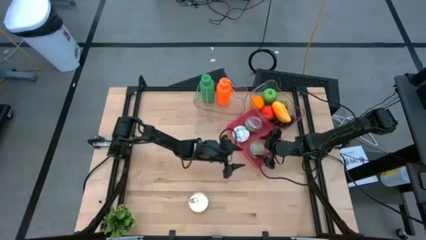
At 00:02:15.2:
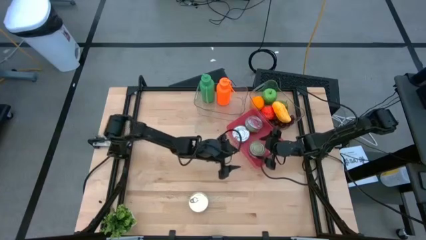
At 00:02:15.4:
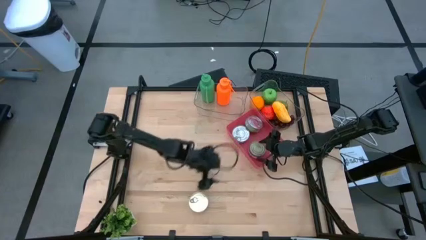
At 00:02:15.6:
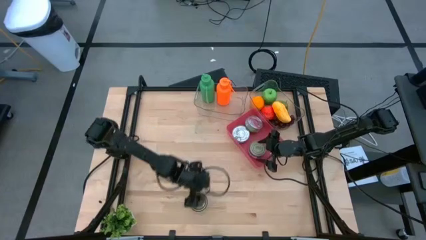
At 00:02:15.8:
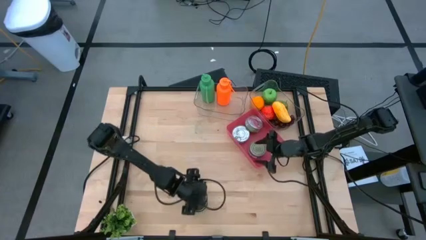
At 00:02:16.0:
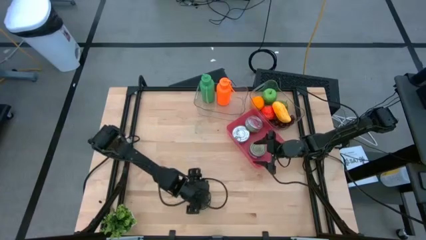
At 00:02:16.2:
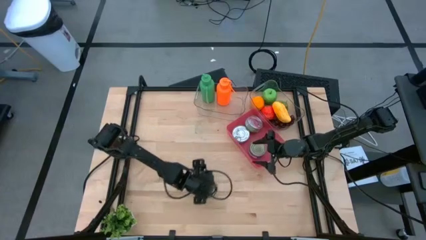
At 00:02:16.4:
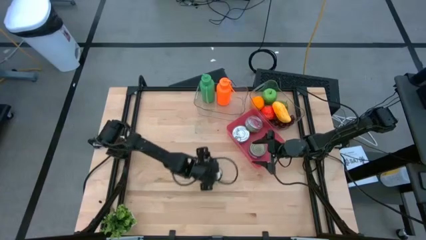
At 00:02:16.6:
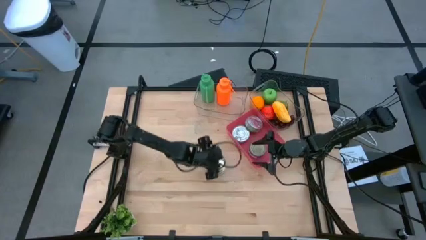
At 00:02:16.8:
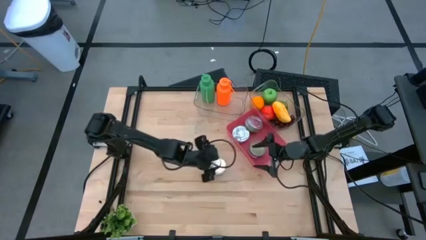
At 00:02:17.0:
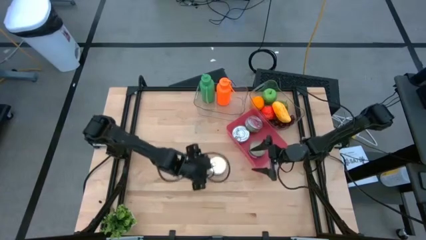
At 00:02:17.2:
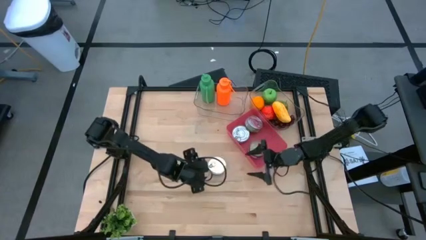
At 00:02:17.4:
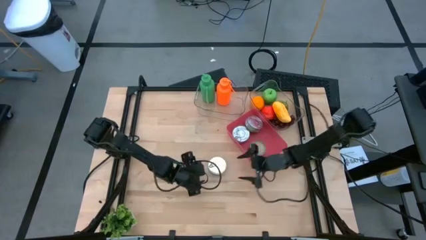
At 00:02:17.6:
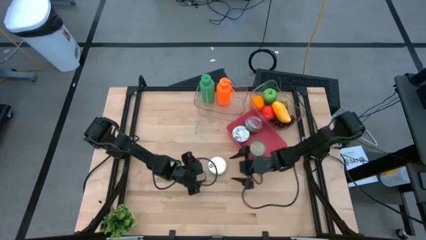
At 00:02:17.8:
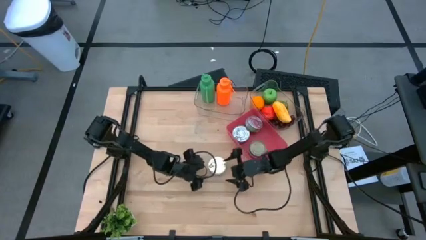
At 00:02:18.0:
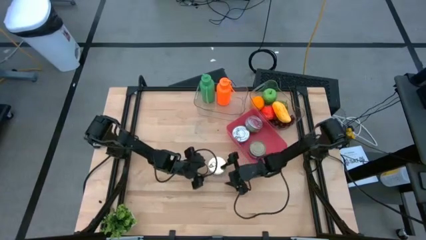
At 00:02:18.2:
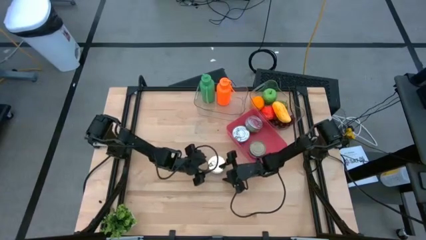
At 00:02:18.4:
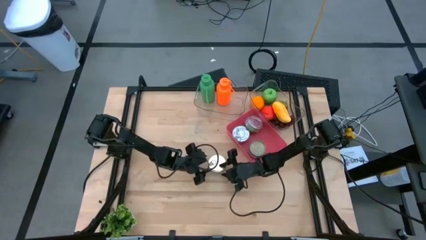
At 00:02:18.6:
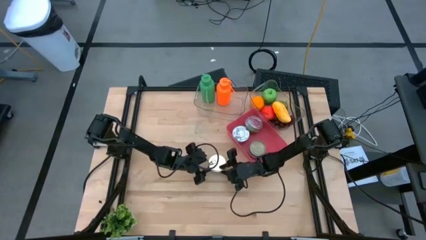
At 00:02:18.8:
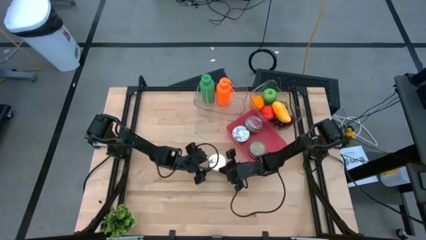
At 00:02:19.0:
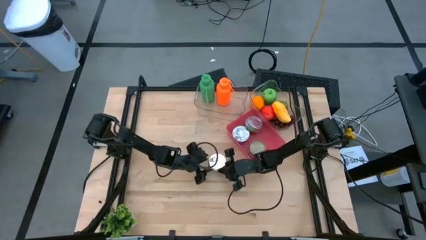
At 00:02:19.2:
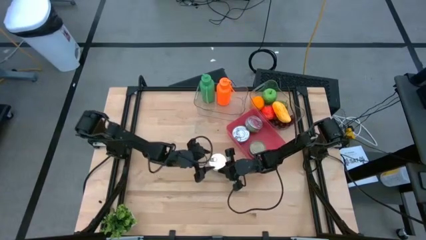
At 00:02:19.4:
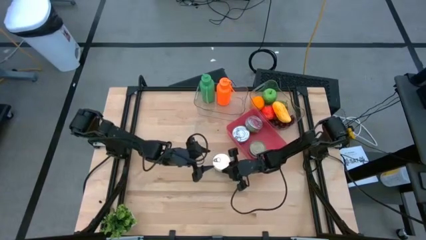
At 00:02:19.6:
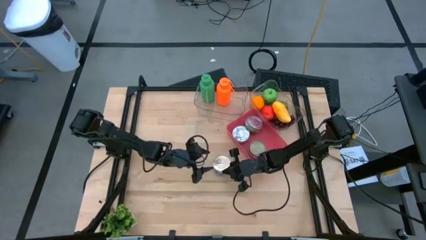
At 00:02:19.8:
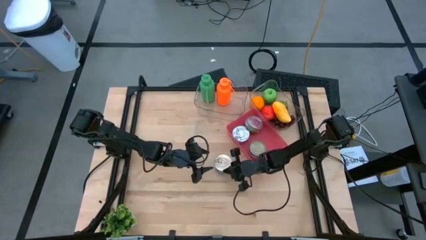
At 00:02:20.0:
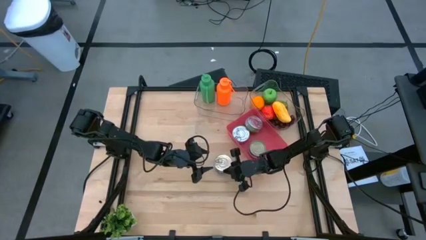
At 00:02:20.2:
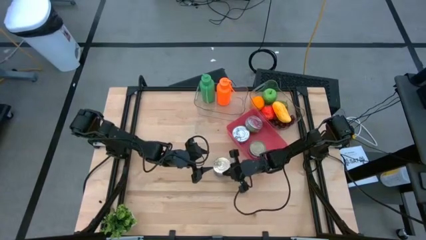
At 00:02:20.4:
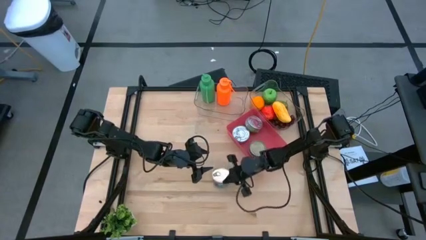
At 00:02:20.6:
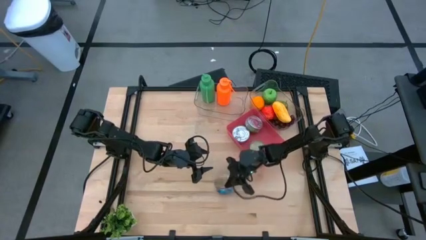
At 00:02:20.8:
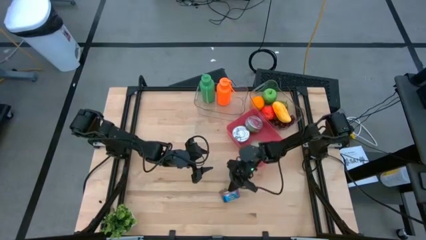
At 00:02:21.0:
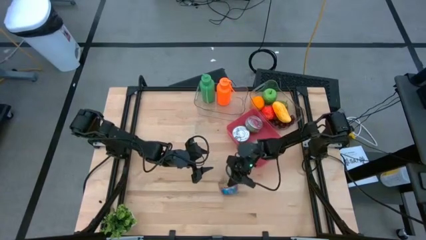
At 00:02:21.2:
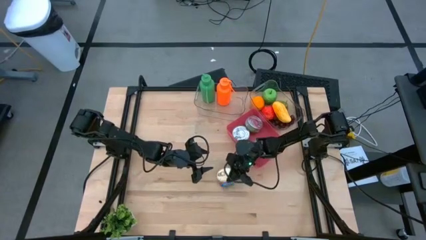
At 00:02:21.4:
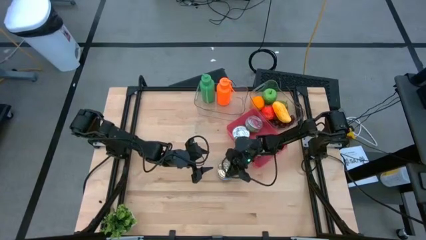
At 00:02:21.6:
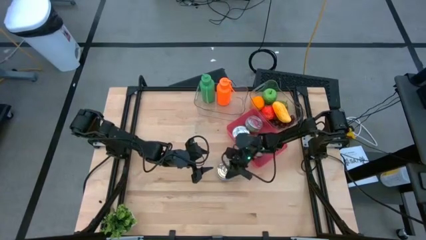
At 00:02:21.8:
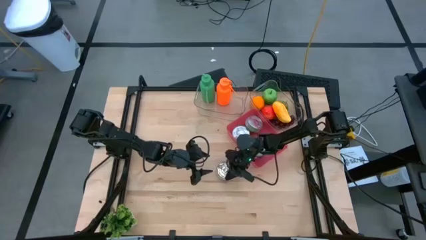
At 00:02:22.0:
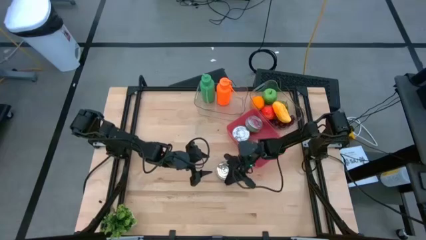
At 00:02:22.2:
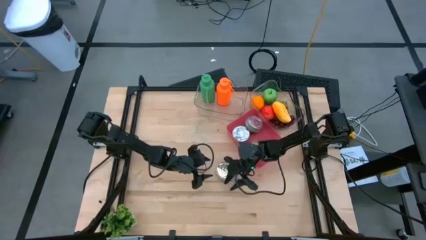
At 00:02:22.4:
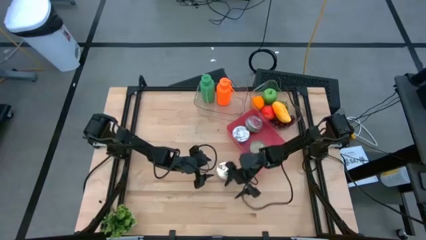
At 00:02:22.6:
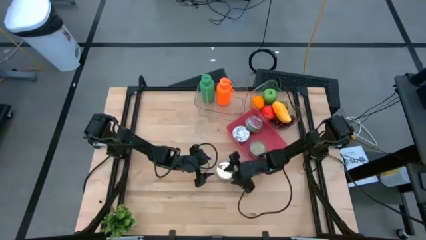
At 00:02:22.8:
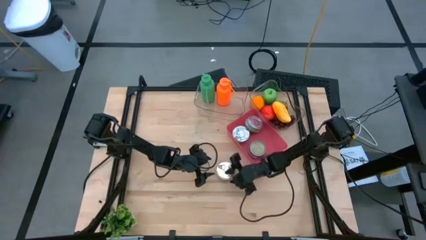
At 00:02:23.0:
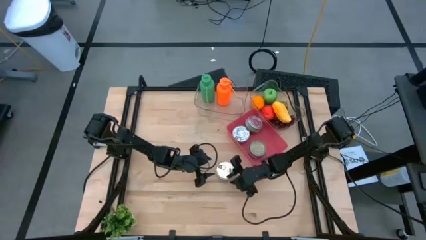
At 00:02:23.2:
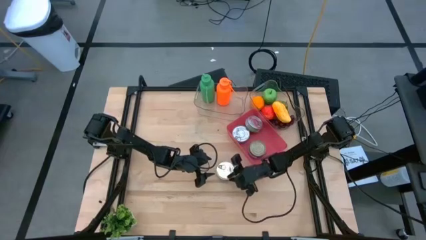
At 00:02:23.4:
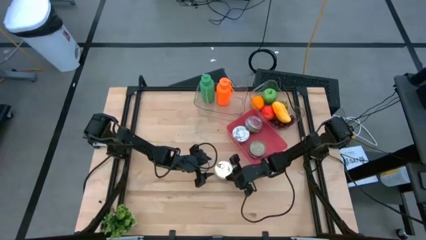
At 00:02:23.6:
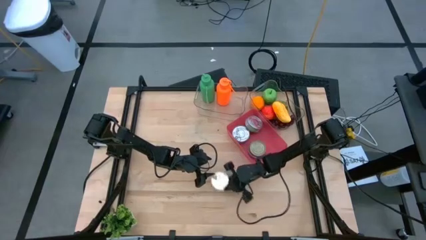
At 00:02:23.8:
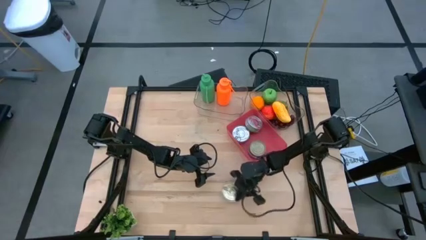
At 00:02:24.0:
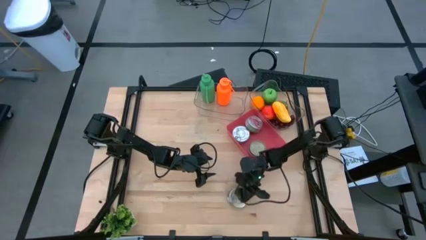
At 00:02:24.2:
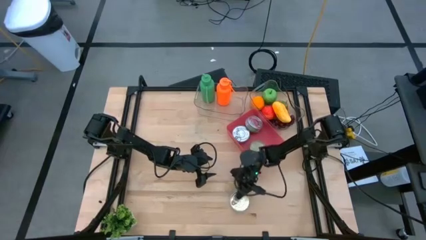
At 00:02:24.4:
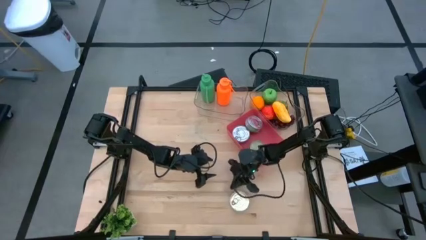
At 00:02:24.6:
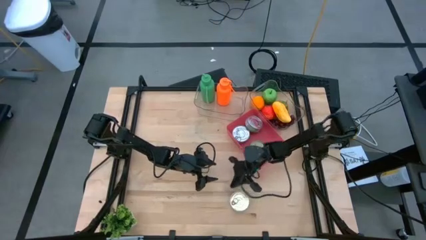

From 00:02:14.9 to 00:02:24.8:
Task: Pick & Place Food Item
Put the blue and pink tuna can into the pink bin

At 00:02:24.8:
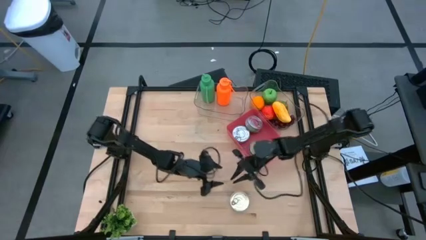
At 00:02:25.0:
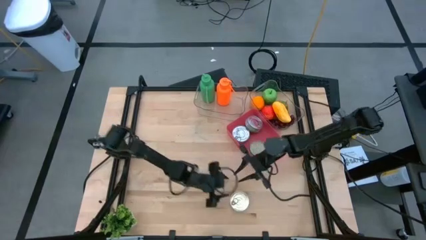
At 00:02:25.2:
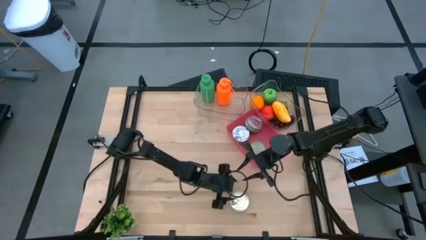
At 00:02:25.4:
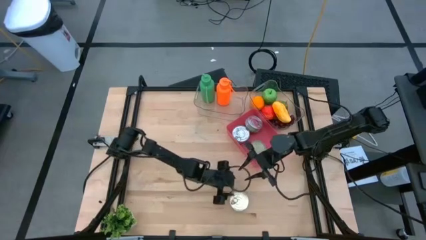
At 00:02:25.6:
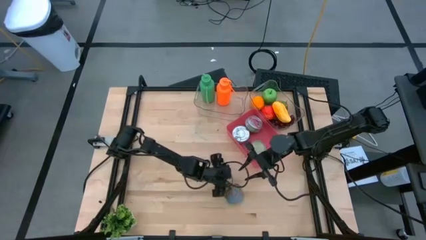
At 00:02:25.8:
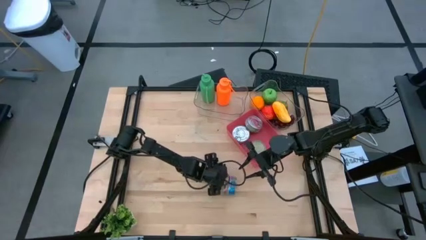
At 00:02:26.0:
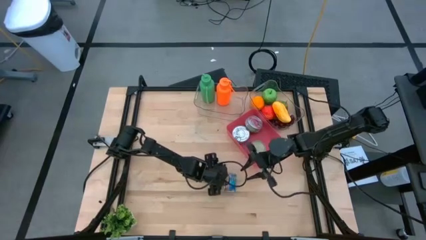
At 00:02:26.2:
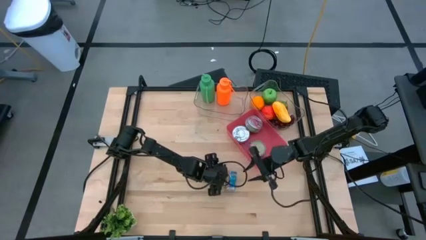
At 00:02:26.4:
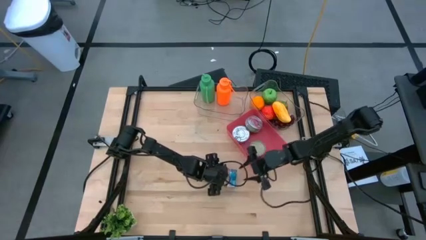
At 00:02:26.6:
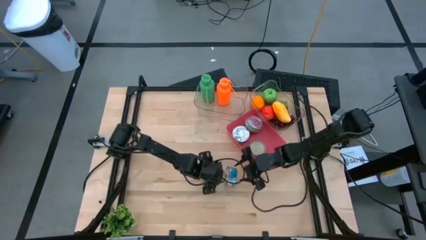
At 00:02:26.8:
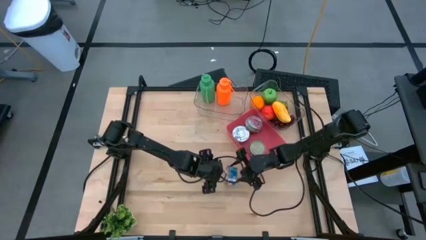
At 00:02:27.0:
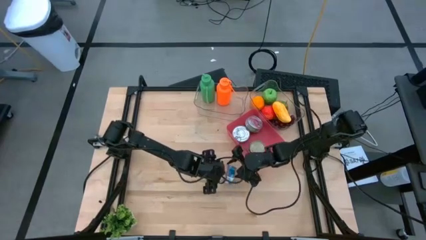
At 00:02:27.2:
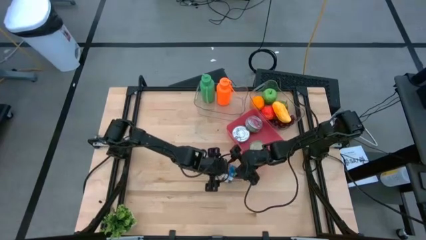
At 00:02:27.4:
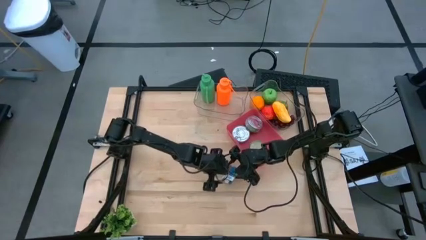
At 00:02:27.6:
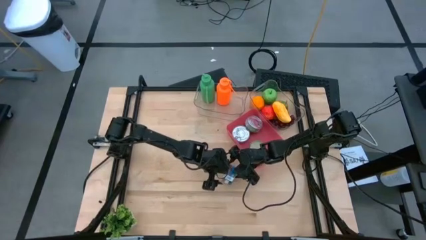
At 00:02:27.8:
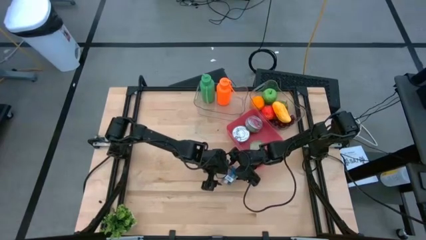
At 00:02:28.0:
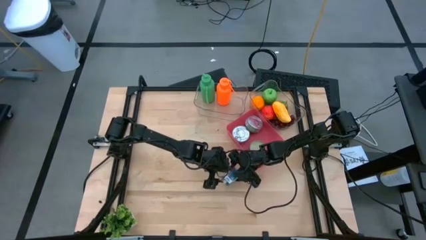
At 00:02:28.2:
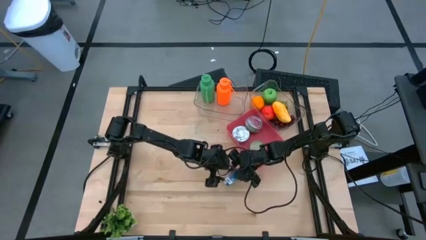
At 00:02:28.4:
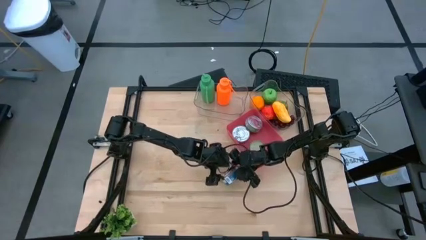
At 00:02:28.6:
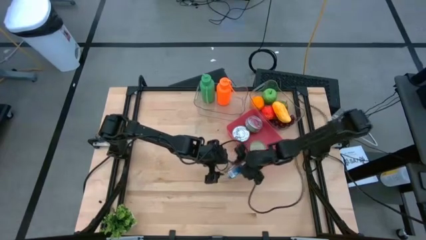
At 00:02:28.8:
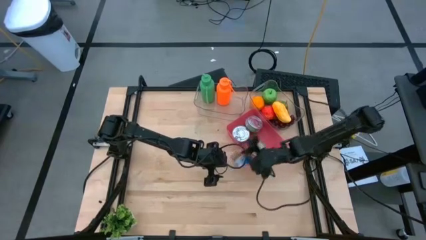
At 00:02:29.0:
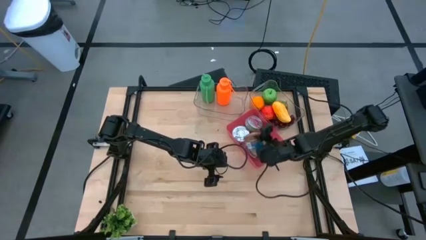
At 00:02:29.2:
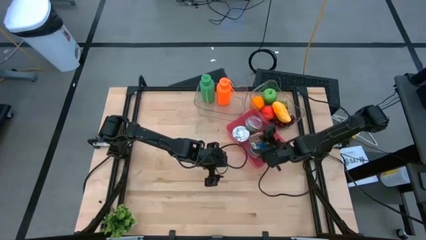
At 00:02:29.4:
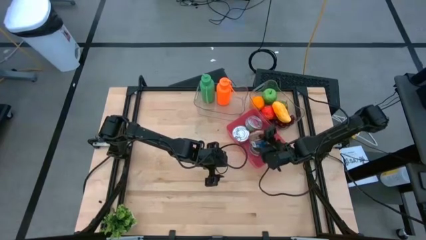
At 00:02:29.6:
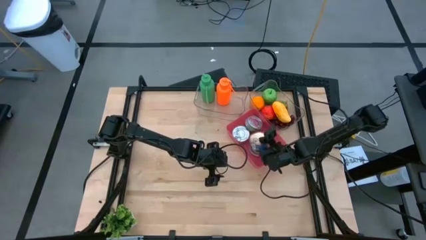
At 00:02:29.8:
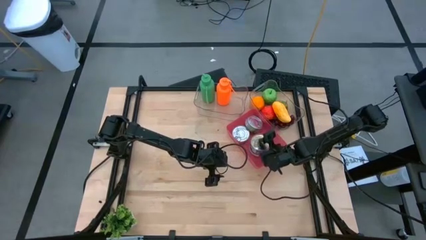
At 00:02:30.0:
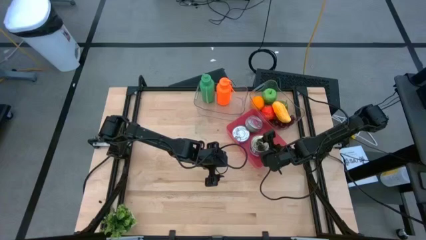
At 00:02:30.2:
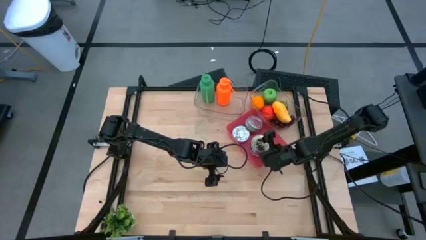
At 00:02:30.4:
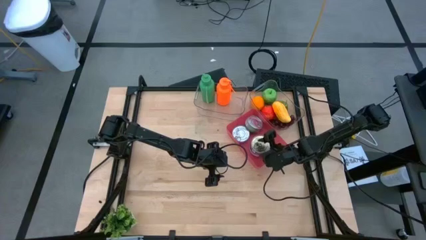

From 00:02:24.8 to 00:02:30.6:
Put the blue and pink tuna can into the pink bin
